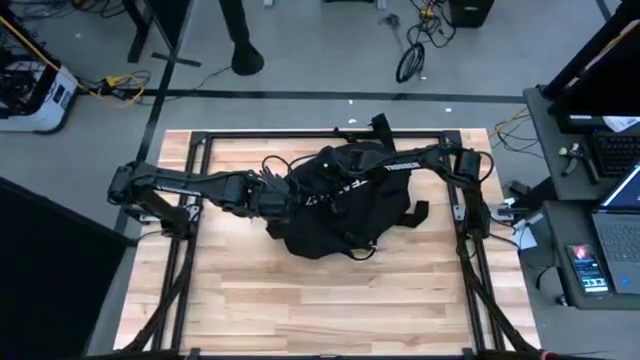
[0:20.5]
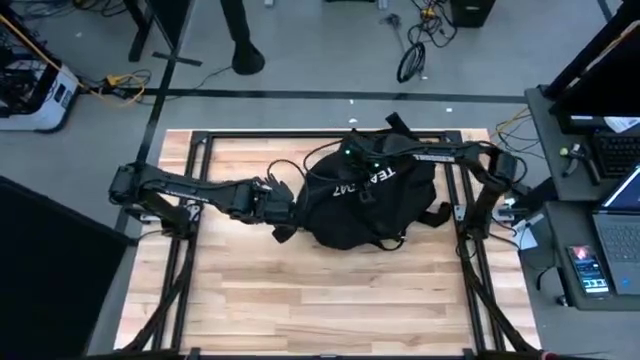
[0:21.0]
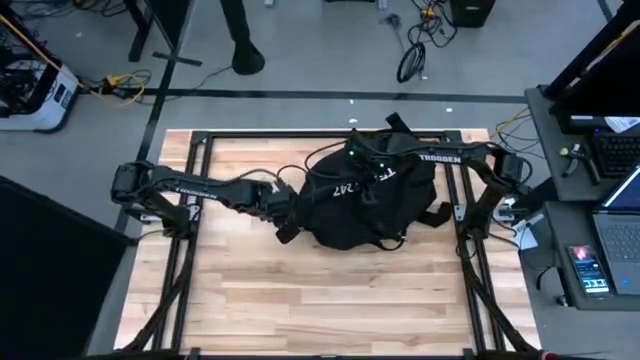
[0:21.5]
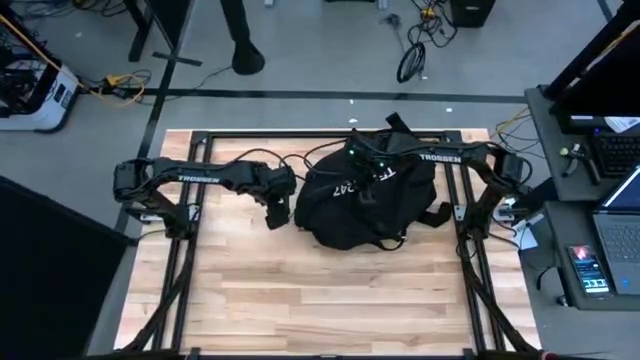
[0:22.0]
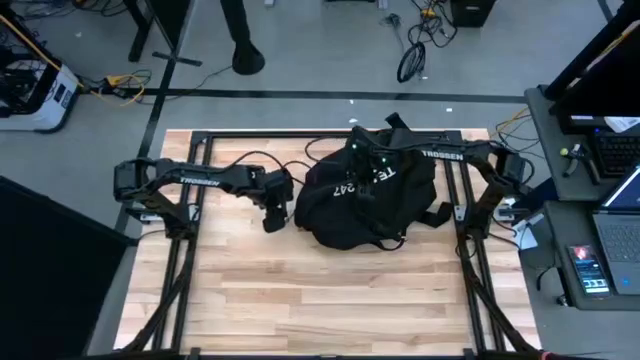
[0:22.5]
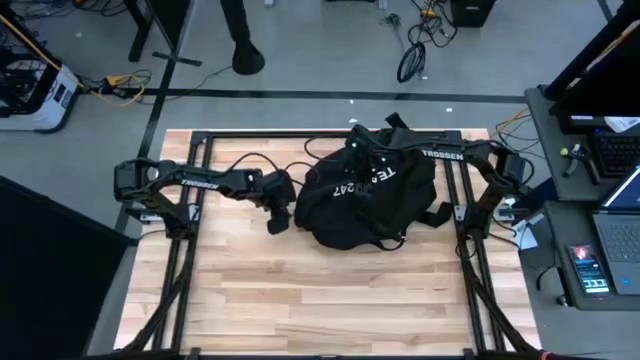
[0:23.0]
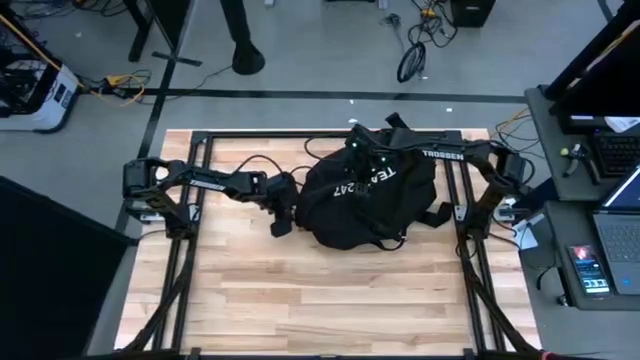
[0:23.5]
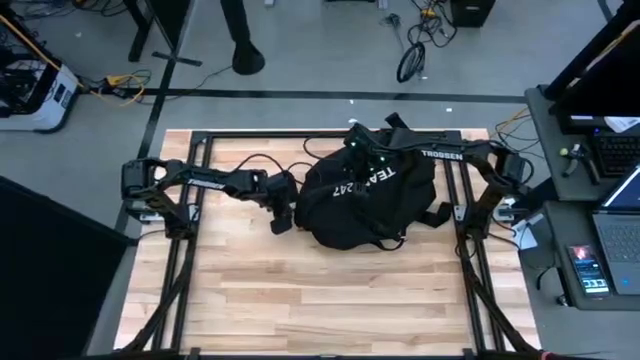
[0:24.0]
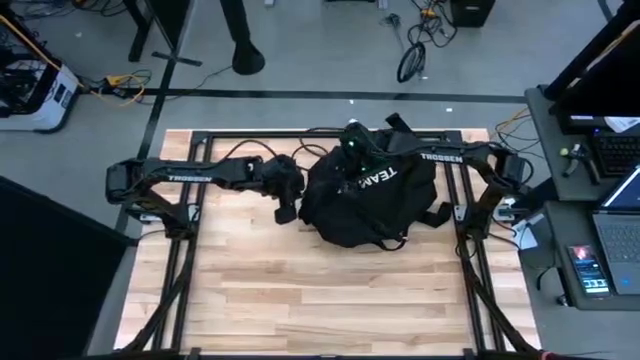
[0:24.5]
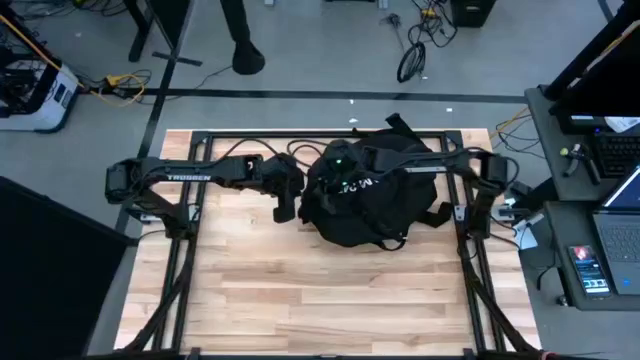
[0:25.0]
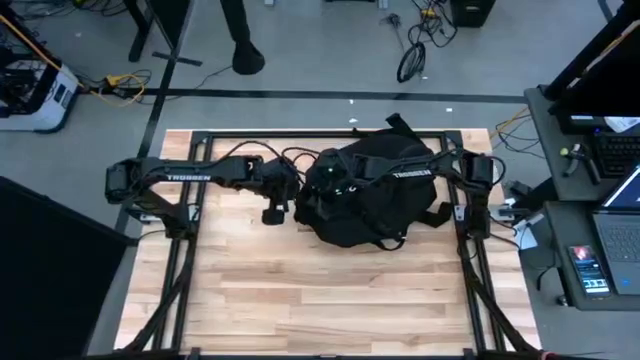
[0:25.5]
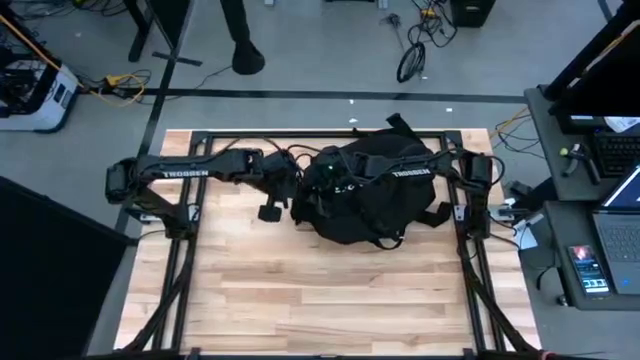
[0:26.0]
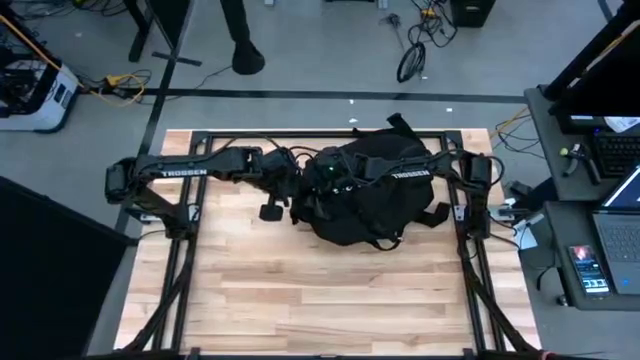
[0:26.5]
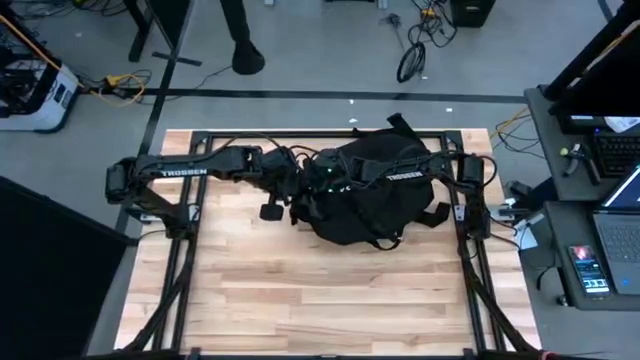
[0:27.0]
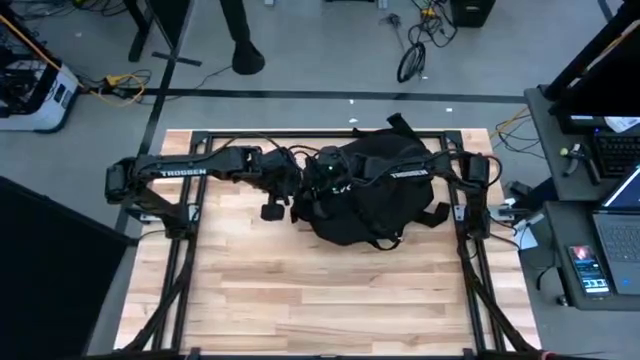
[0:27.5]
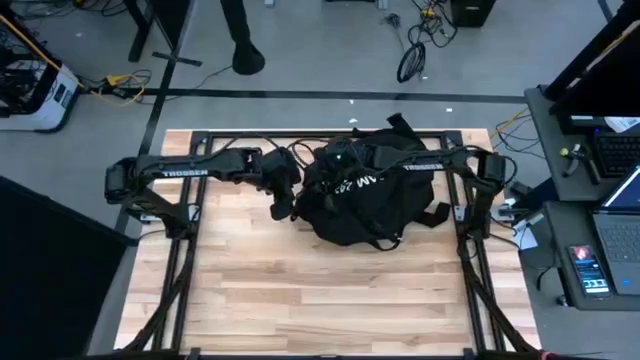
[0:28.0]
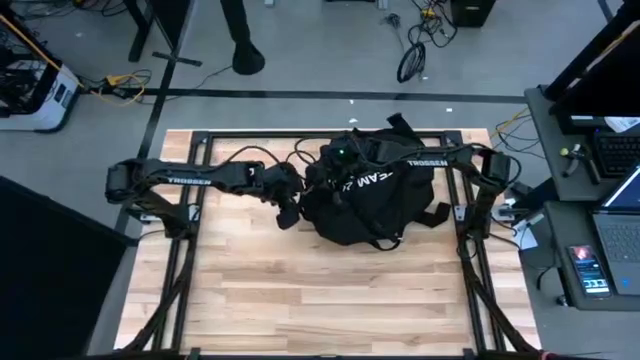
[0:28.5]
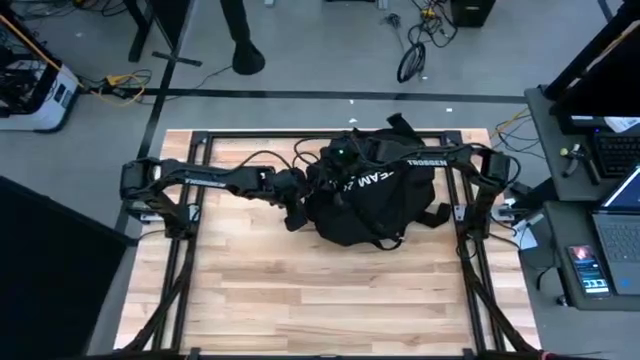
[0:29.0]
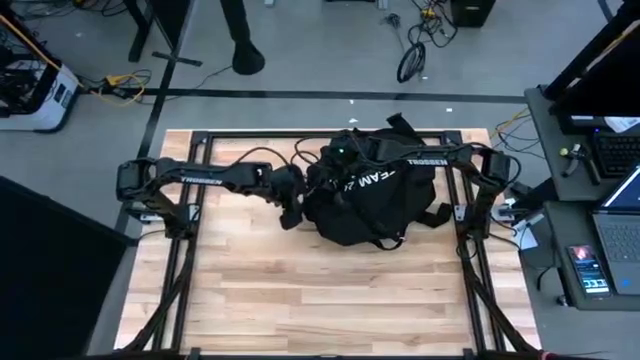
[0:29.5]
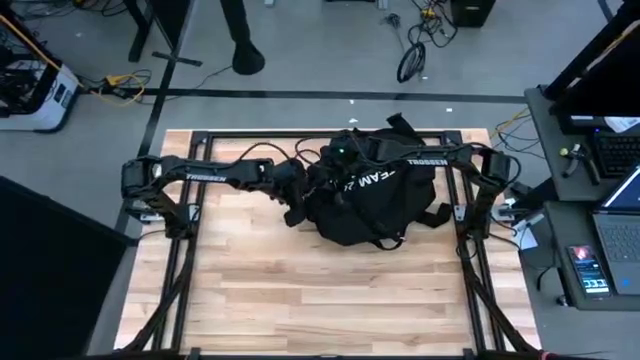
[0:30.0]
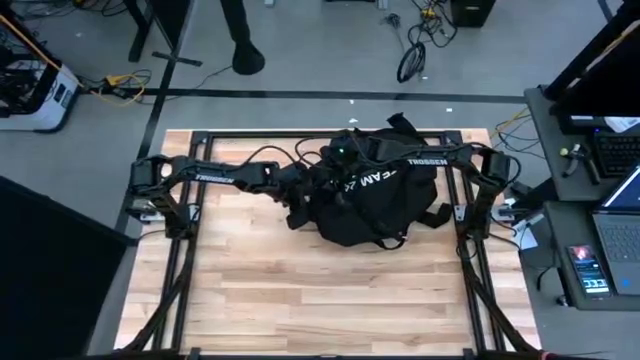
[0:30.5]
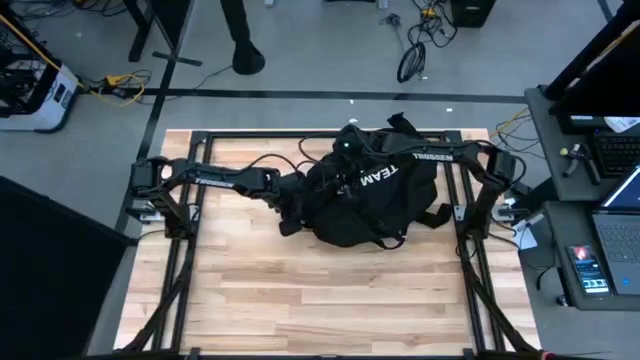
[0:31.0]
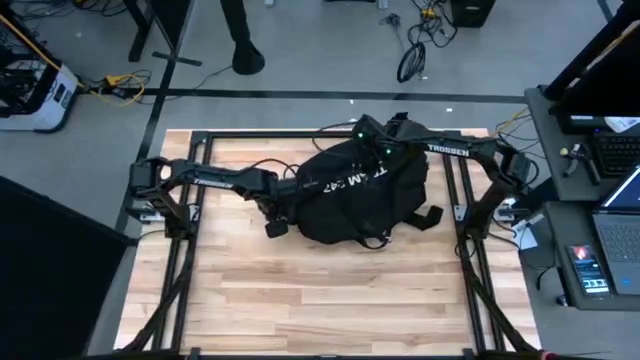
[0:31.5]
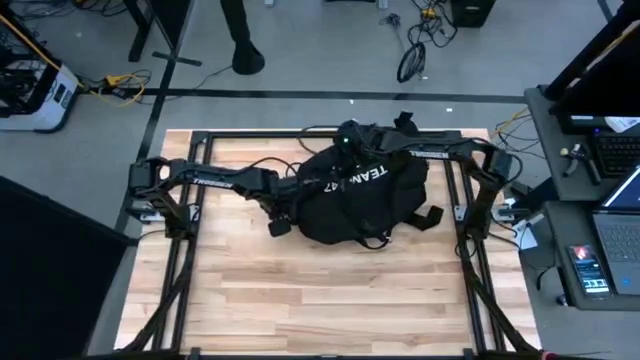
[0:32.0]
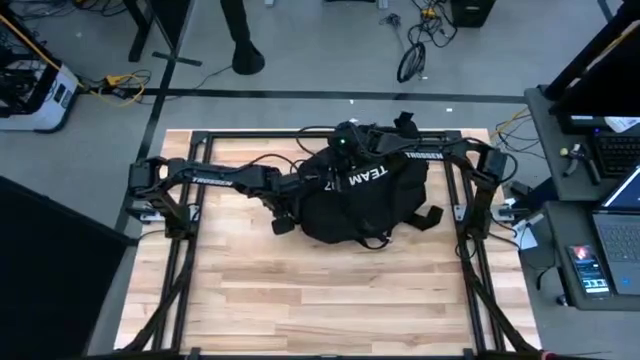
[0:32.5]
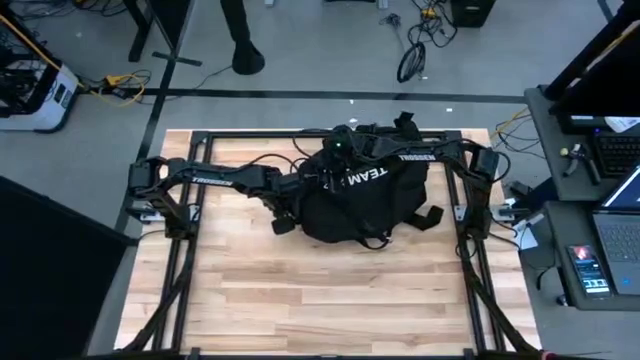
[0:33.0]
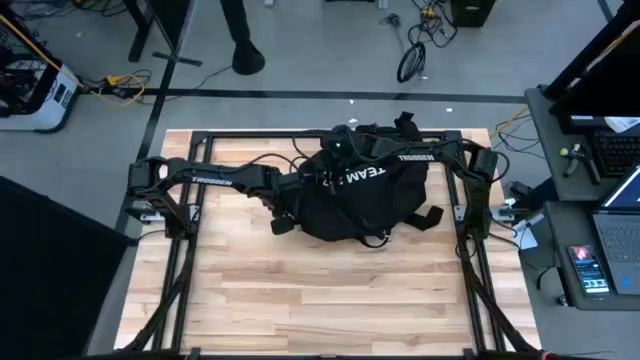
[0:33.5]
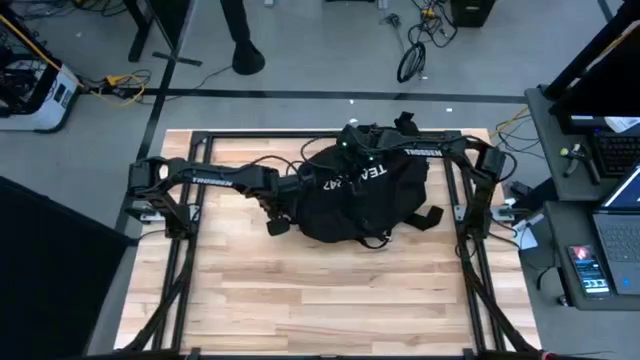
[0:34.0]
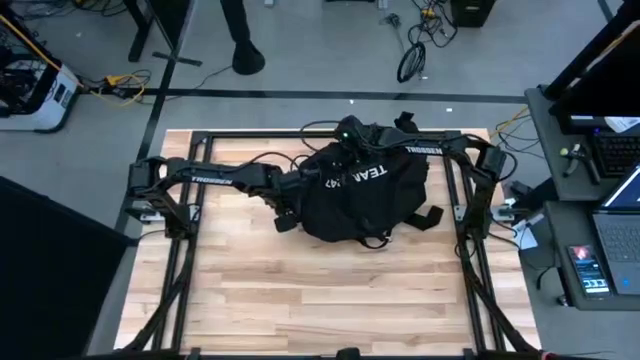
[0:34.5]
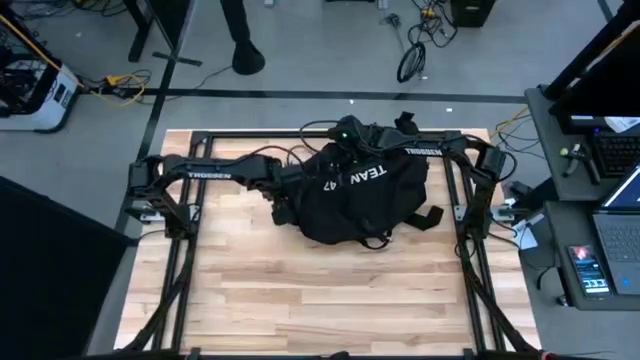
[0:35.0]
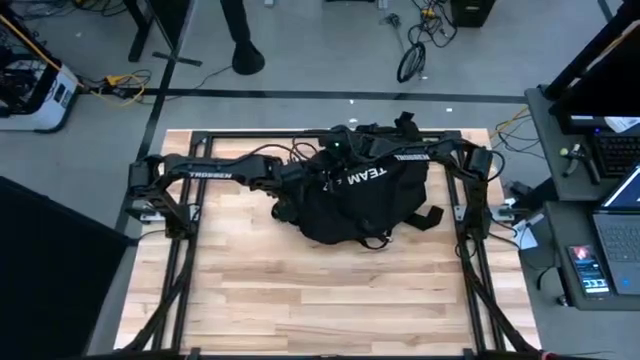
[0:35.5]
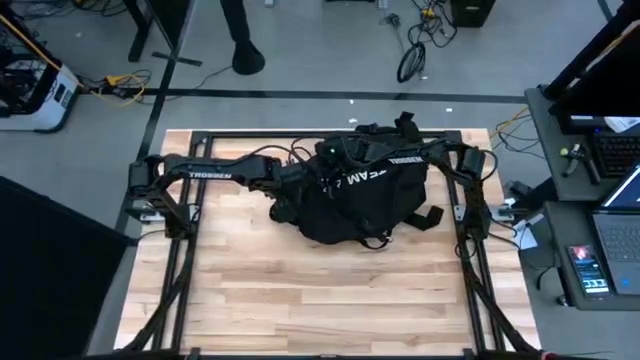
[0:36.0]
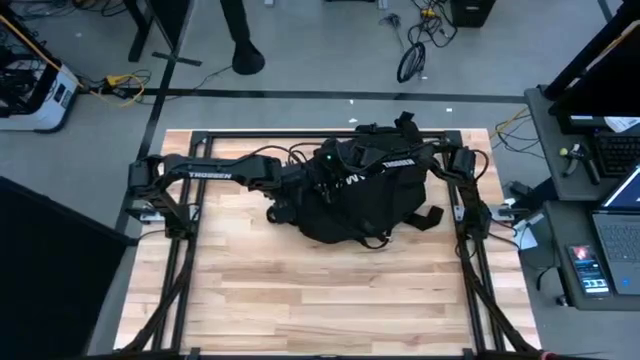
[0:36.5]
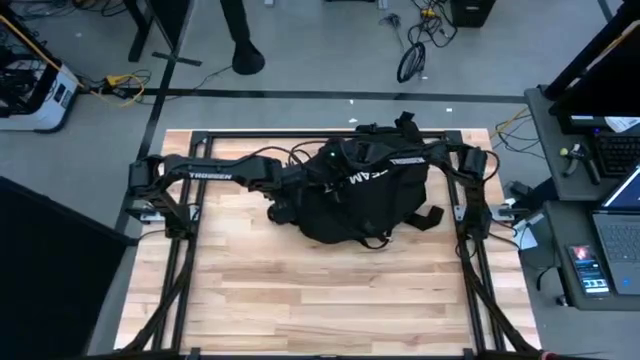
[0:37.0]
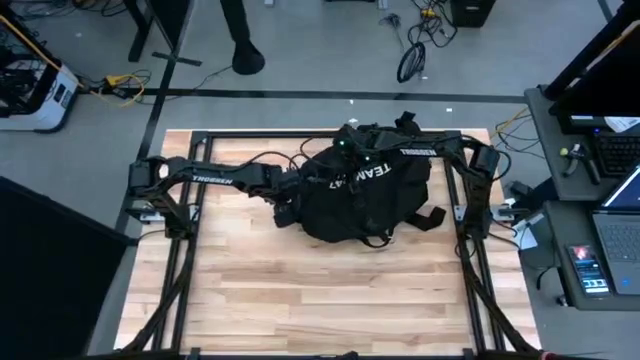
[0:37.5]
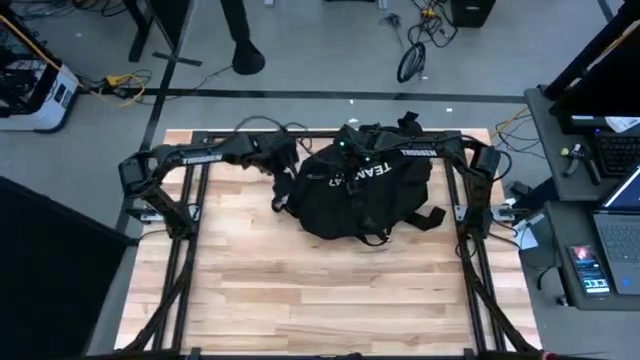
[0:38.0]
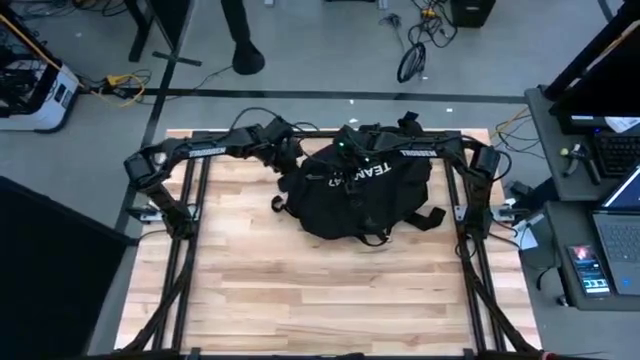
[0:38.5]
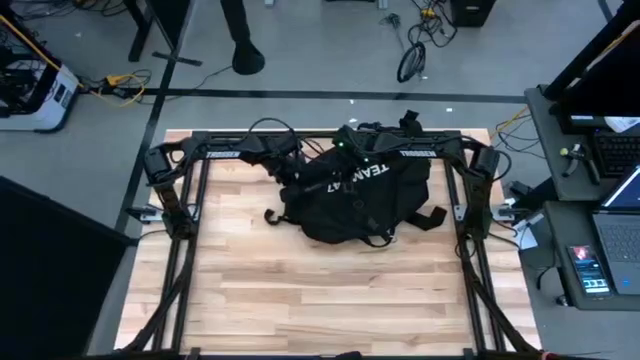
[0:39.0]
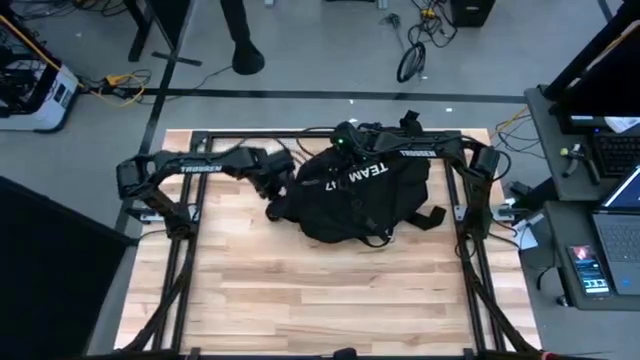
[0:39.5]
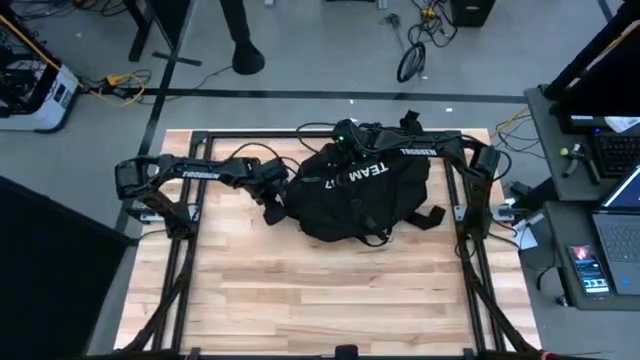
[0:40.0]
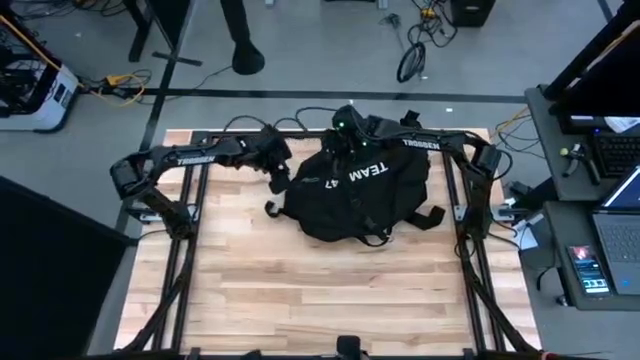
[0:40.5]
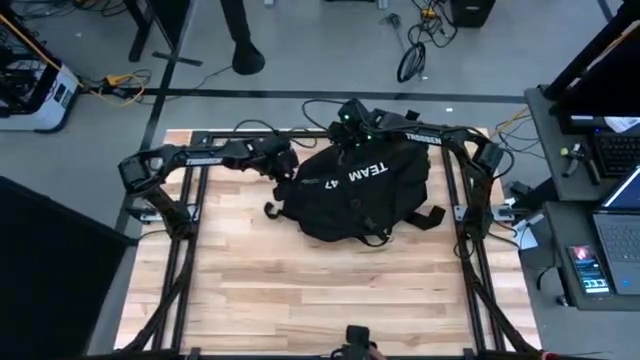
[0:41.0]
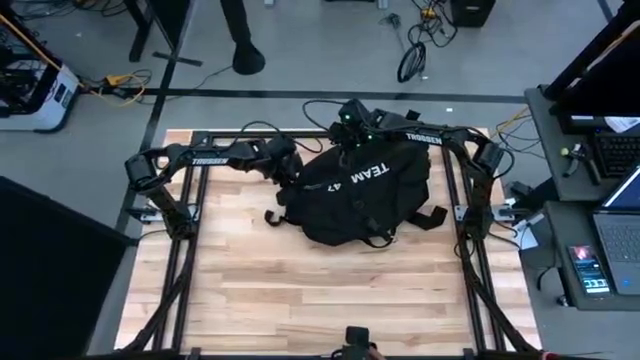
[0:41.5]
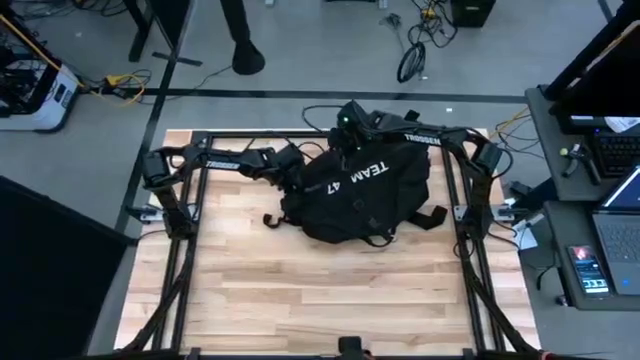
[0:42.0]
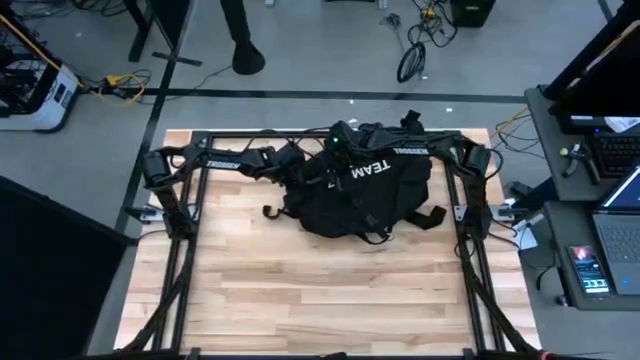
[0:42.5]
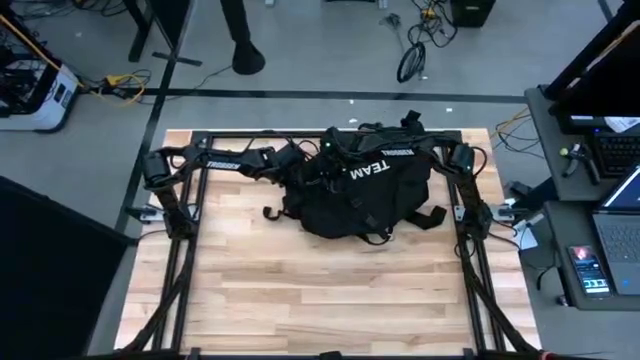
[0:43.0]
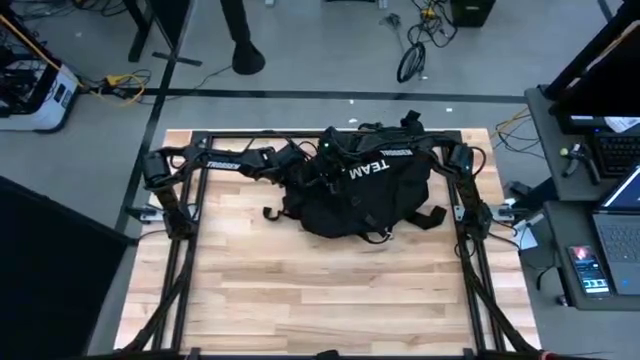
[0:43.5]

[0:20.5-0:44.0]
Task: Unpack backpack
Open the black backpack
